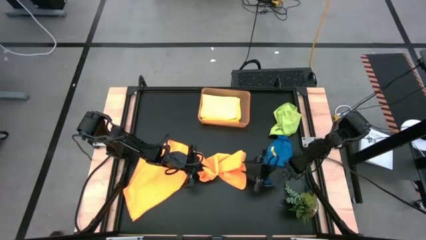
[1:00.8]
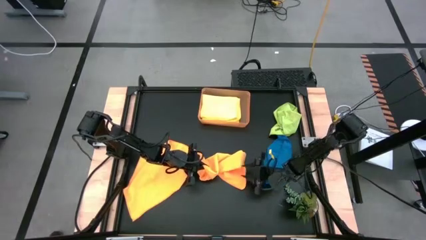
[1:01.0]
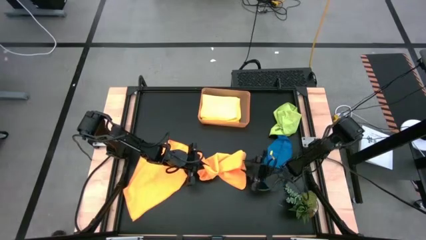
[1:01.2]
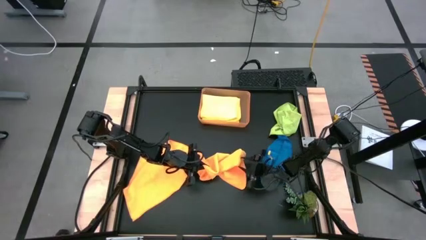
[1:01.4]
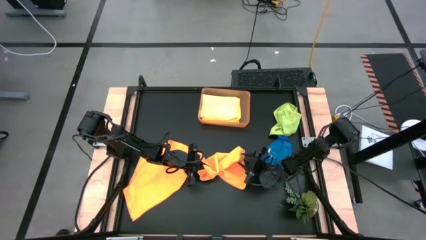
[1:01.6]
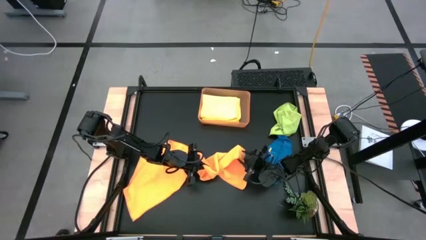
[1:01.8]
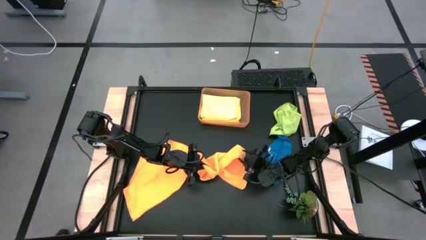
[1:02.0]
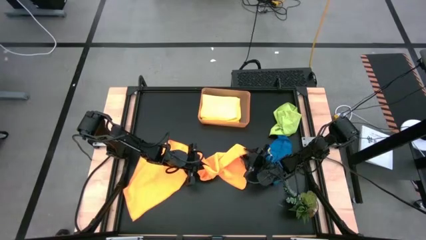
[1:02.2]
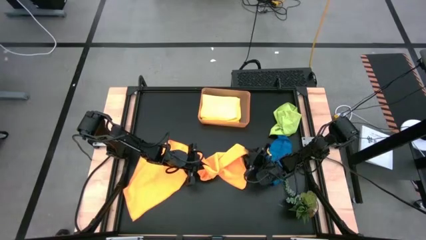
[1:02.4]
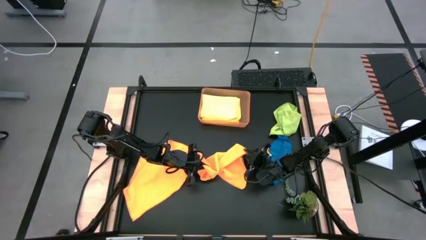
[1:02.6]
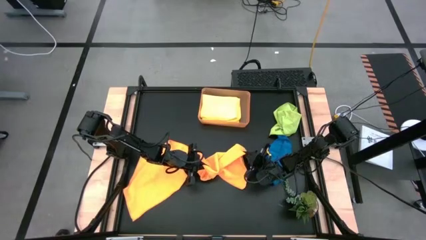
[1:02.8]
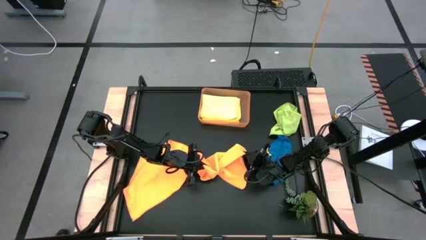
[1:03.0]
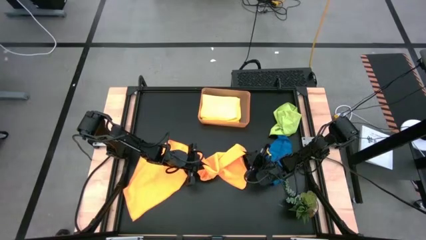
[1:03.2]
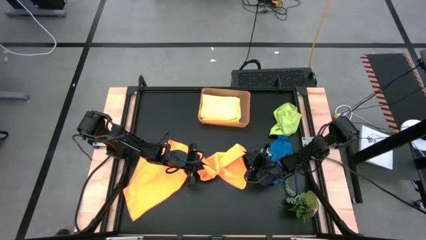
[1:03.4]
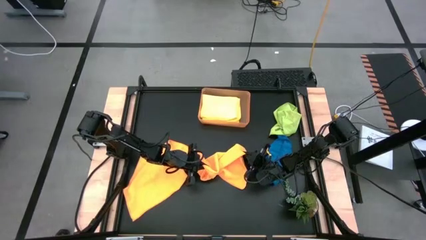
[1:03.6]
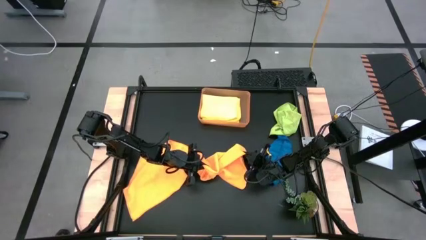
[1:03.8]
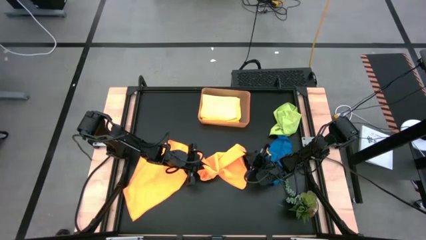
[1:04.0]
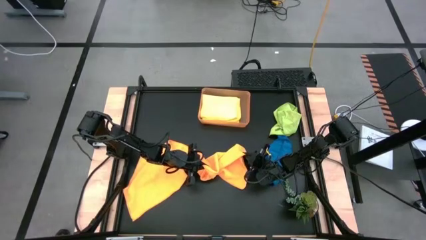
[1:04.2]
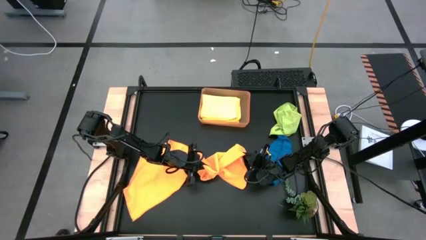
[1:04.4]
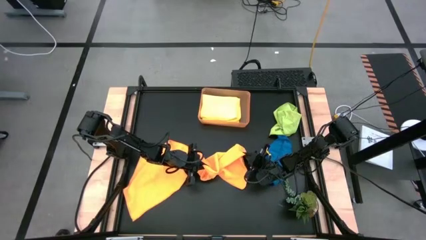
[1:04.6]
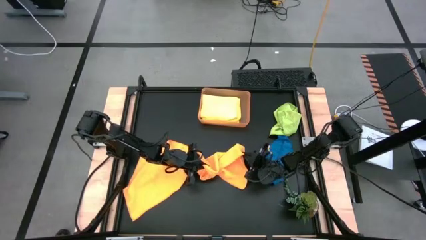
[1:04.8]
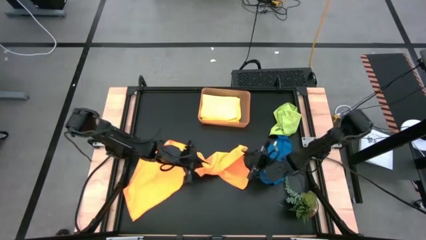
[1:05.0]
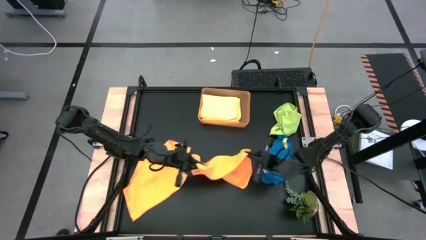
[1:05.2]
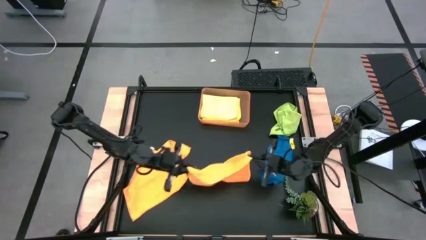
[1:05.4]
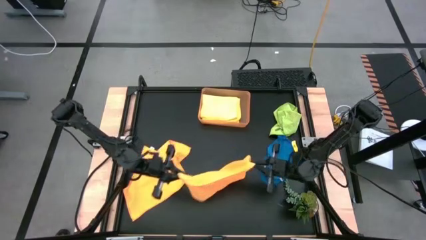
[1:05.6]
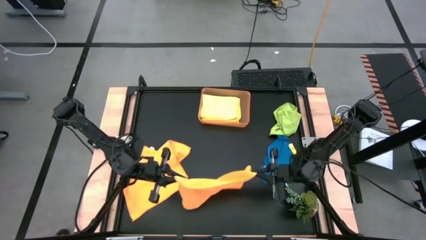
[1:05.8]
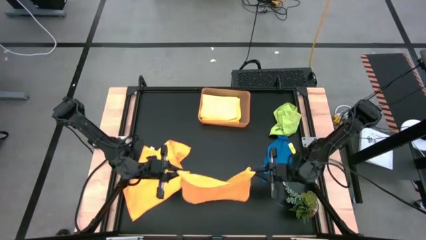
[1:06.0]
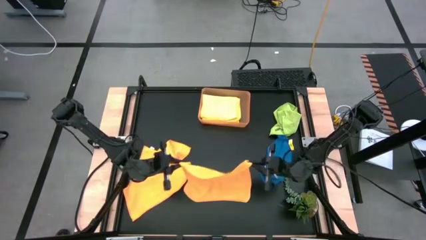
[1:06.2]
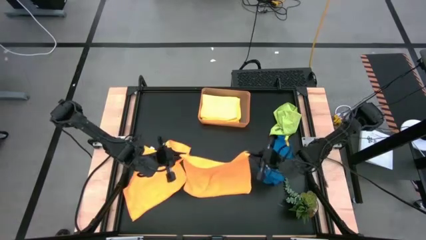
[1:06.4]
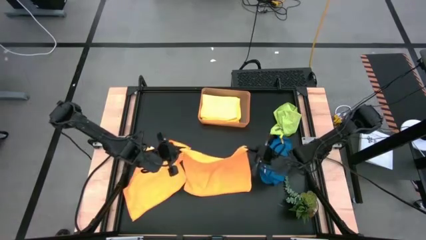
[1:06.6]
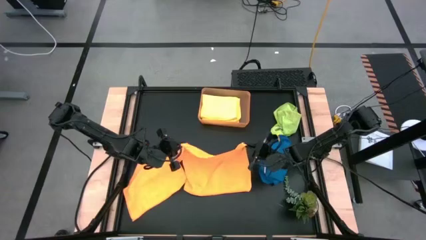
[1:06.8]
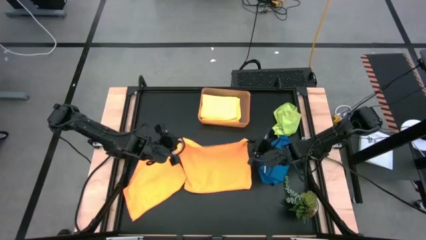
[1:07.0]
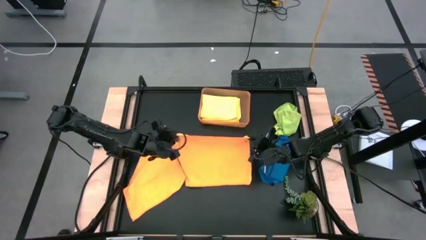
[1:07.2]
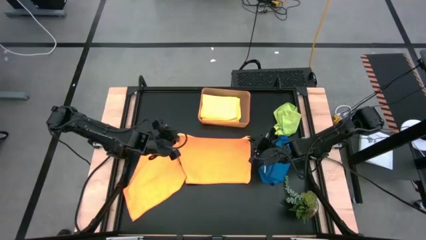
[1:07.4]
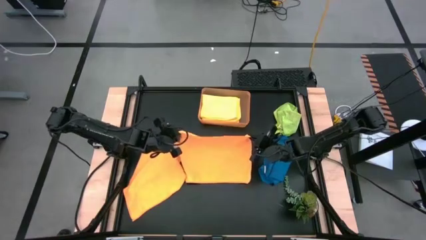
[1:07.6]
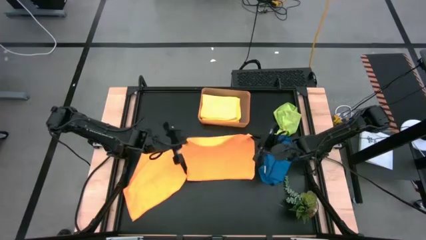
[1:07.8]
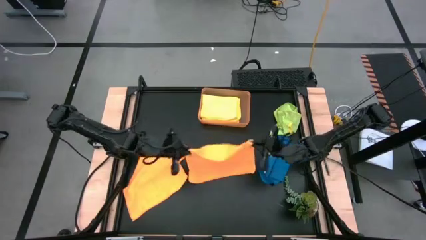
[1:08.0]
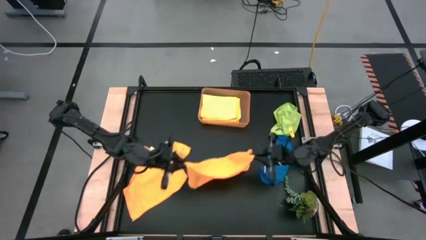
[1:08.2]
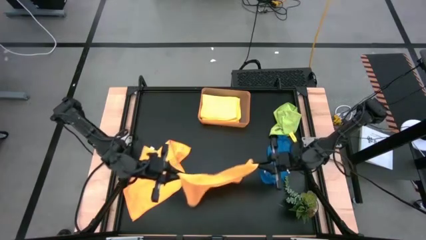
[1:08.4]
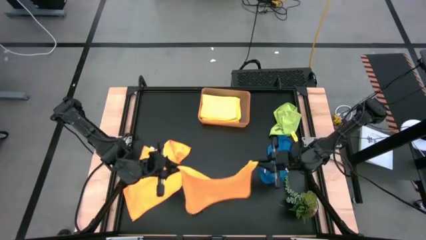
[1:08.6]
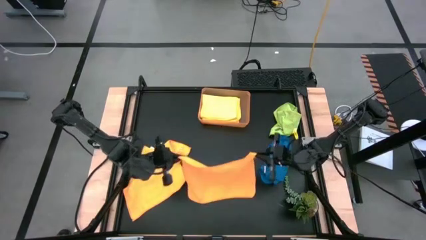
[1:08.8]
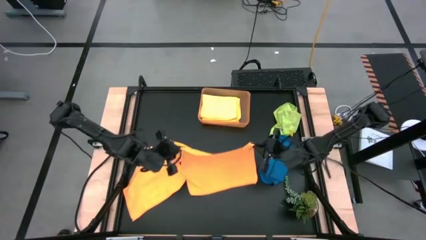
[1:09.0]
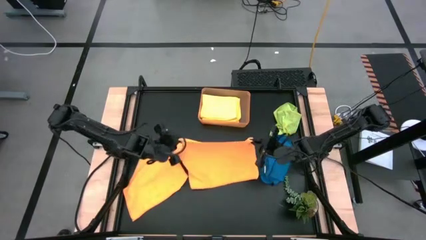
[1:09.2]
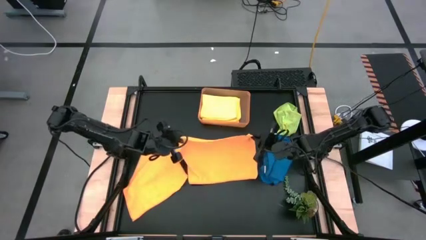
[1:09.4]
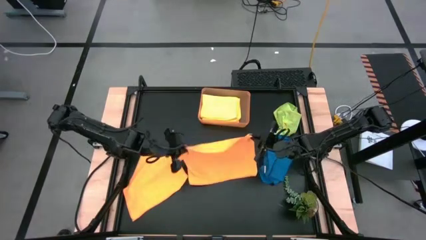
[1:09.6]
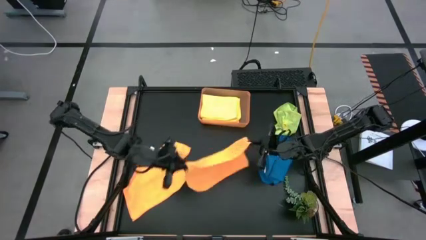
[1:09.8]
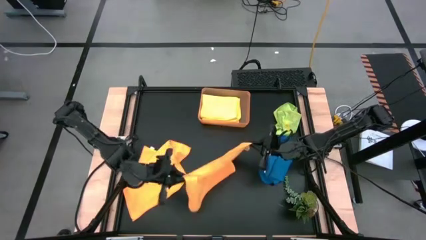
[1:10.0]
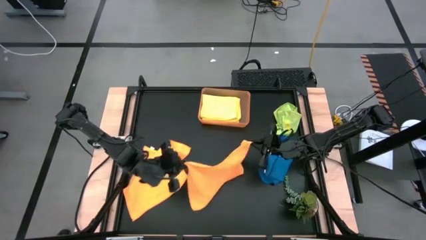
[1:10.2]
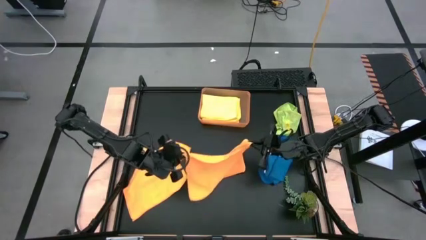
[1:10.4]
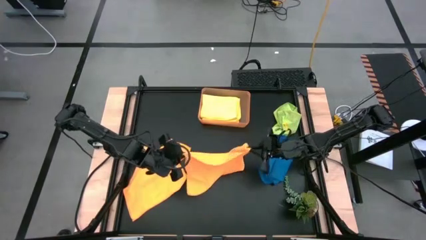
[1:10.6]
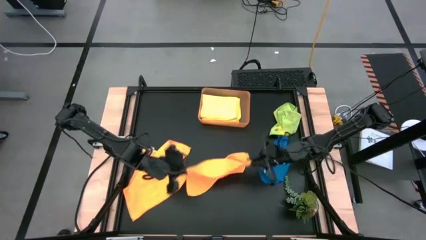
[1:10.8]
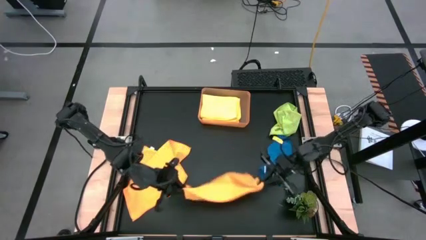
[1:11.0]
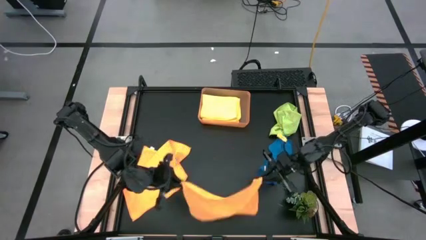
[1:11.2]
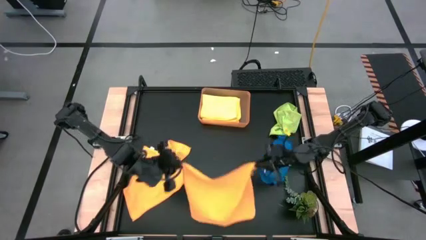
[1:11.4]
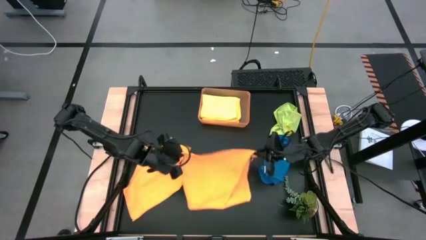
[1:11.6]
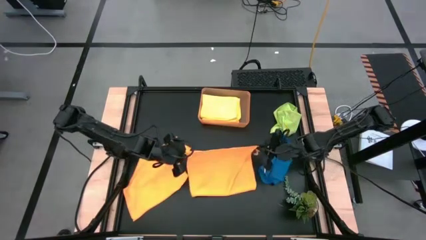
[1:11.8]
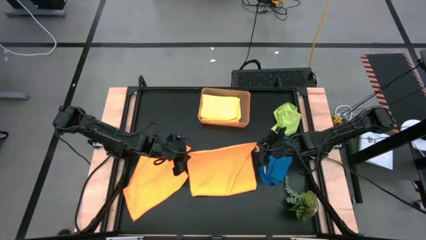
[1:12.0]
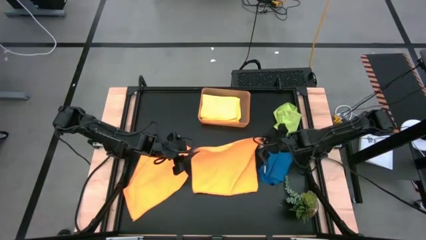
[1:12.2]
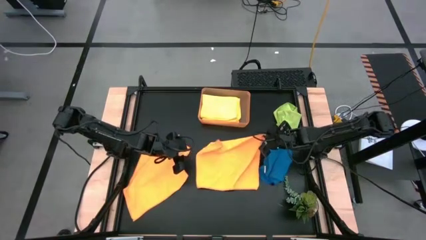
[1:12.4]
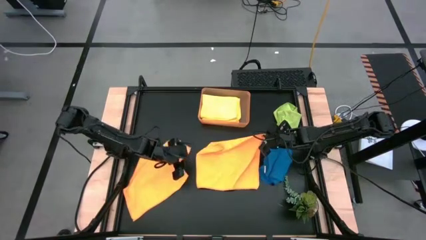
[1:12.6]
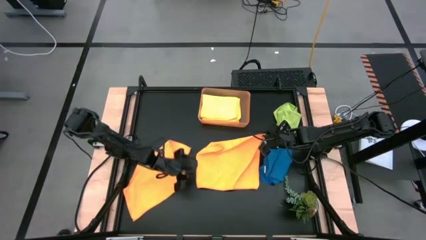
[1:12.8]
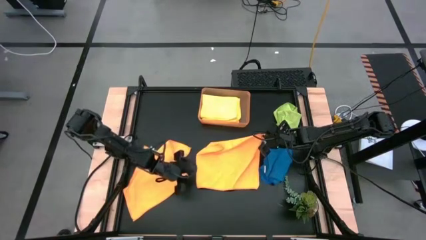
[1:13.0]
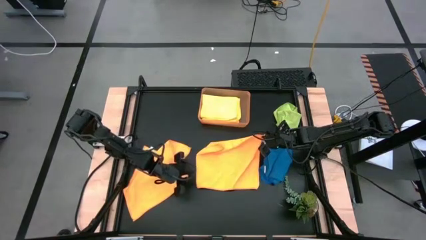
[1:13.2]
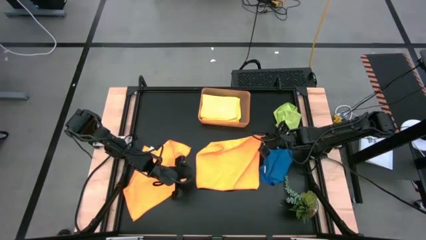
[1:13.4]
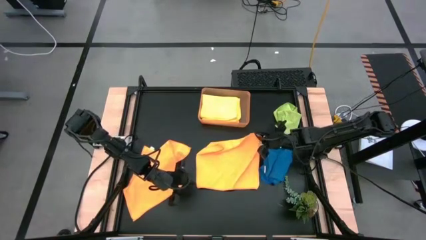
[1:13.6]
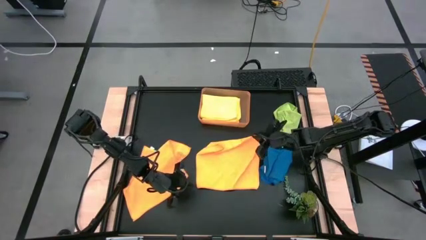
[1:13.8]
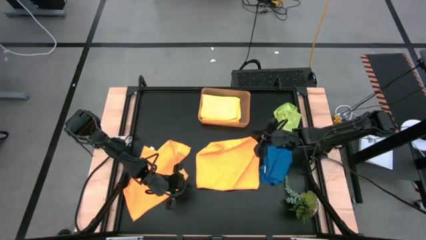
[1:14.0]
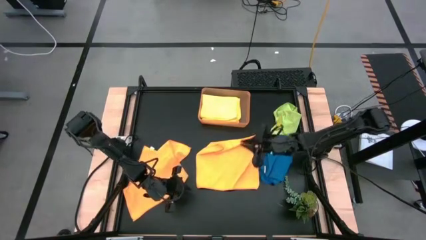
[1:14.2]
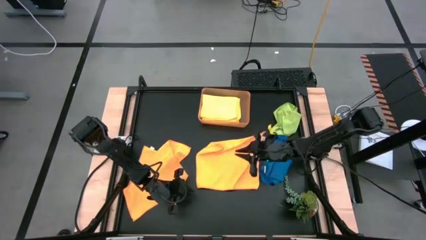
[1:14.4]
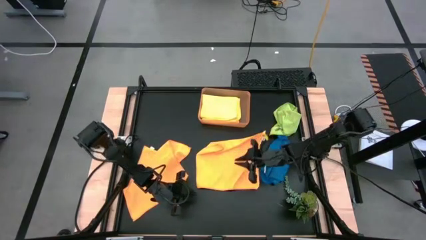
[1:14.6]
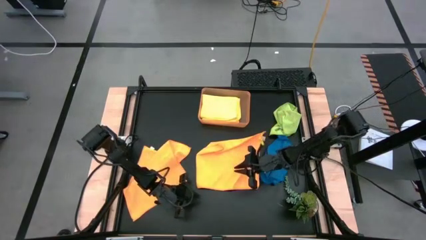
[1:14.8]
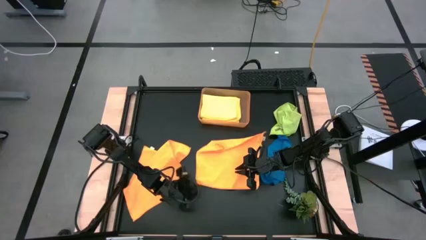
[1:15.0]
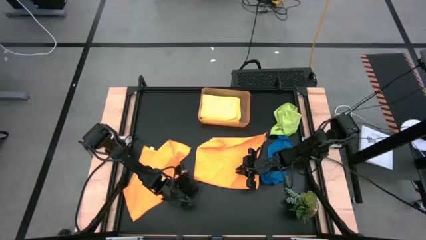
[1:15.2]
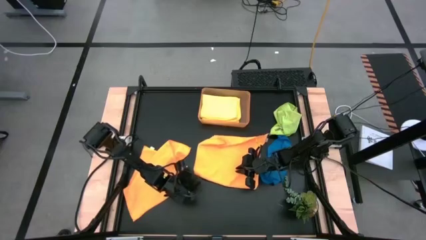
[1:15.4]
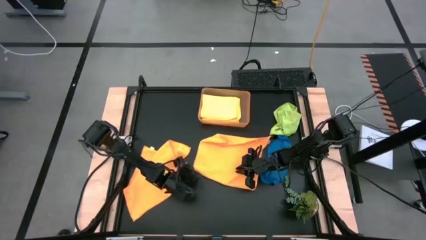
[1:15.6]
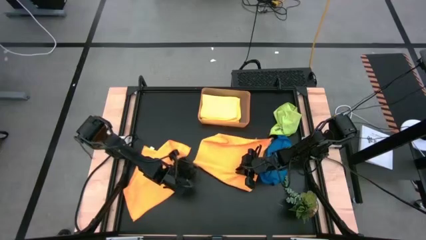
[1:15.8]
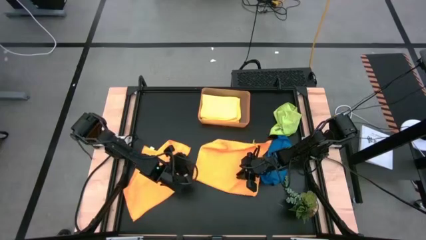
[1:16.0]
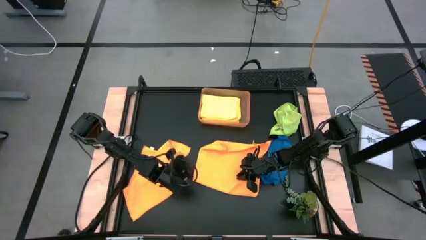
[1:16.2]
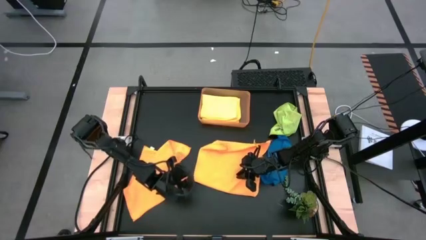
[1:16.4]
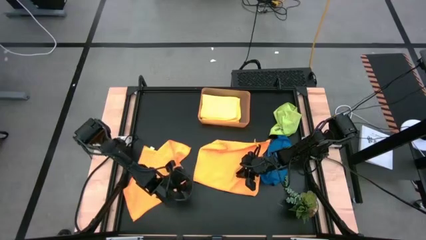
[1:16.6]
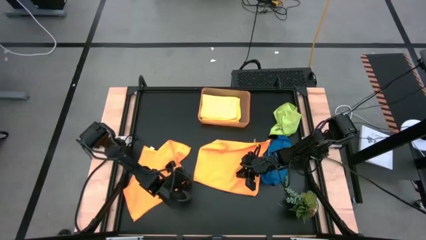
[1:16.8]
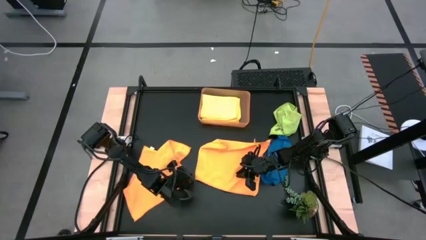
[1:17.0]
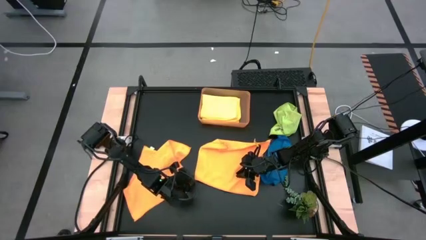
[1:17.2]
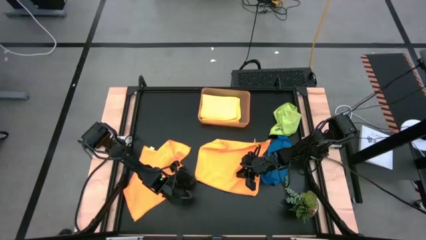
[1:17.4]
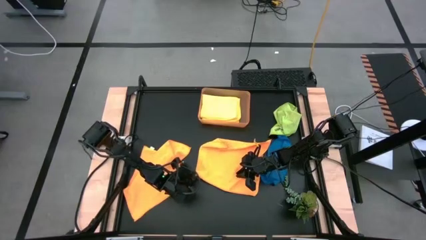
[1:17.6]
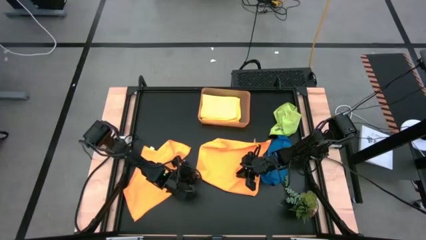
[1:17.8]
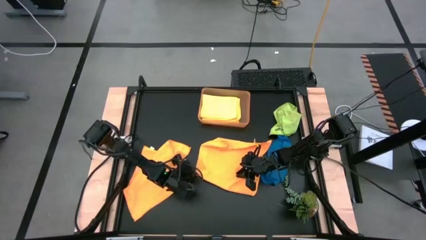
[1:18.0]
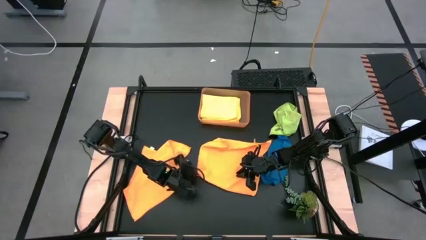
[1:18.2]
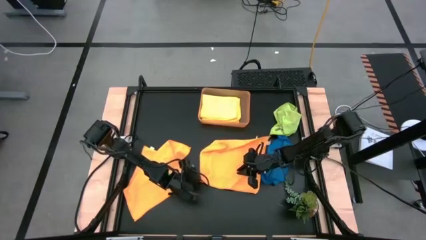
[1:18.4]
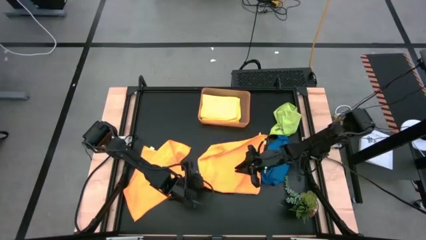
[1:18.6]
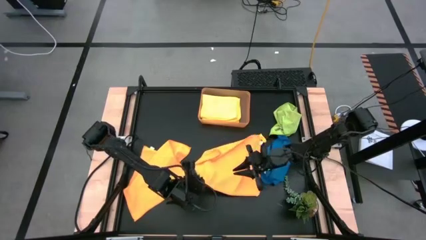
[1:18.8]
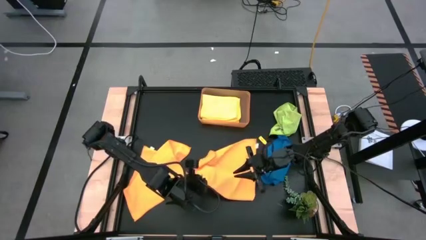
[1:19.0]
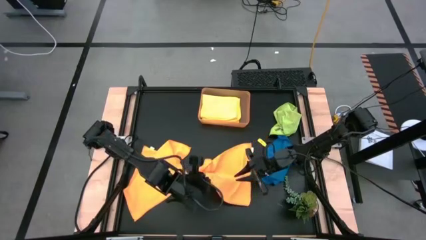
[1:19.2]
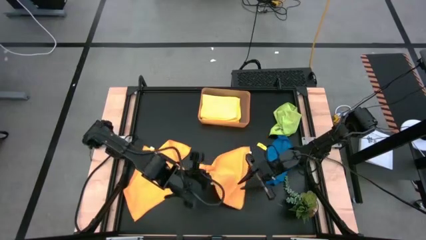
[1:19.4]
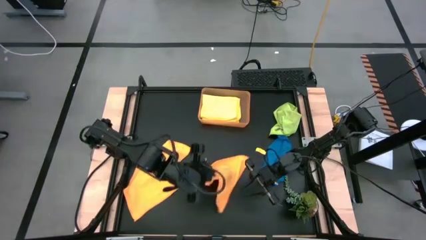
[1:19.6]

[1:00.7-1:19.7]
Task: Fold microfiber towels
Fold the right orange towel
